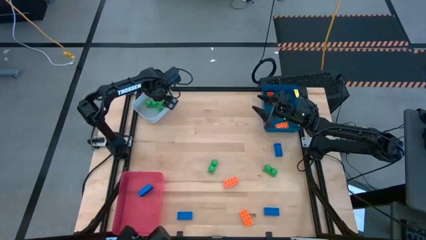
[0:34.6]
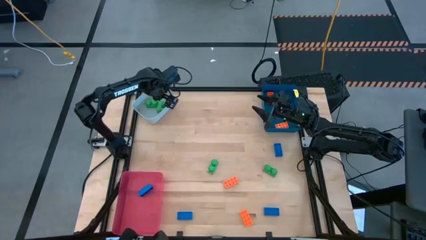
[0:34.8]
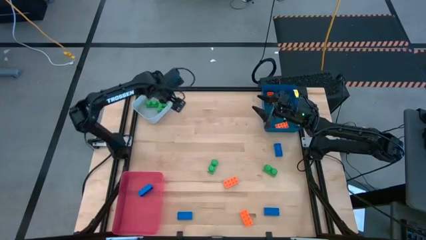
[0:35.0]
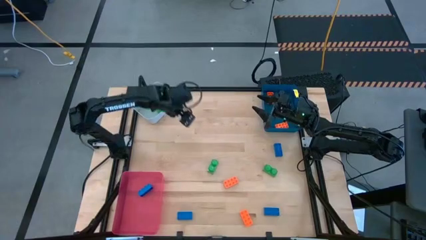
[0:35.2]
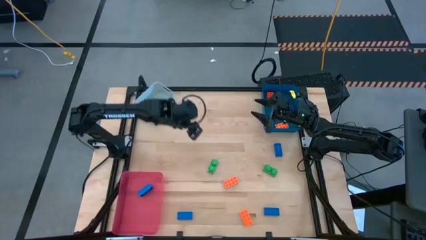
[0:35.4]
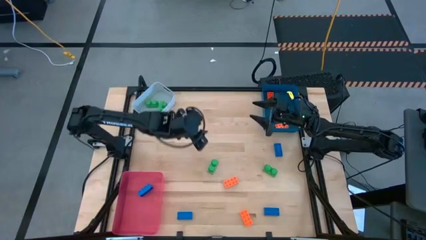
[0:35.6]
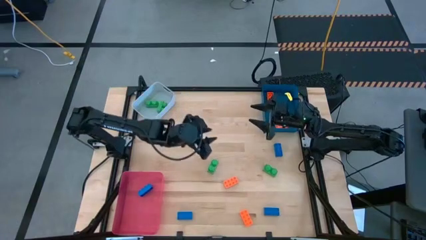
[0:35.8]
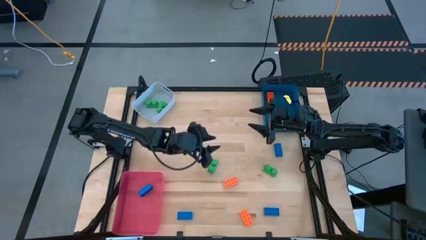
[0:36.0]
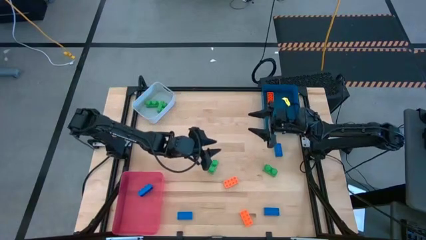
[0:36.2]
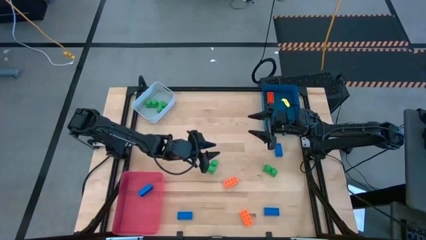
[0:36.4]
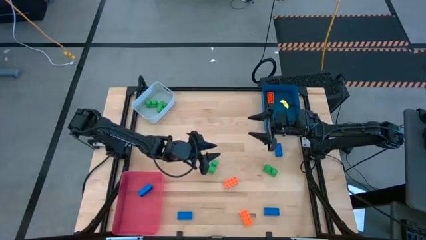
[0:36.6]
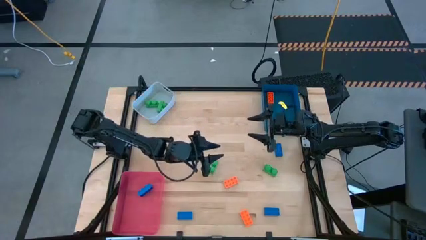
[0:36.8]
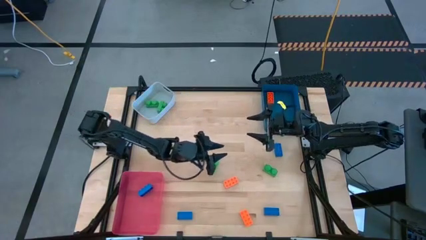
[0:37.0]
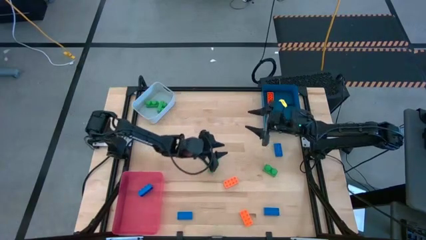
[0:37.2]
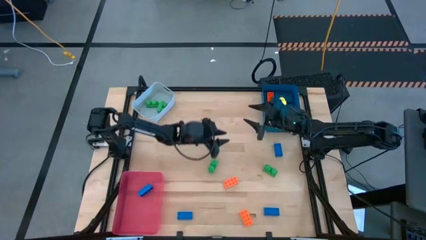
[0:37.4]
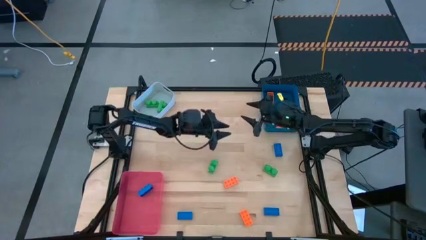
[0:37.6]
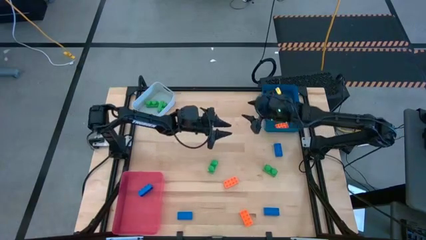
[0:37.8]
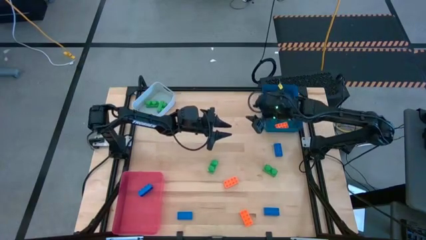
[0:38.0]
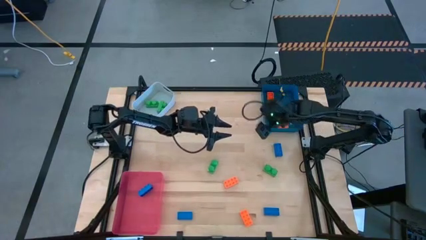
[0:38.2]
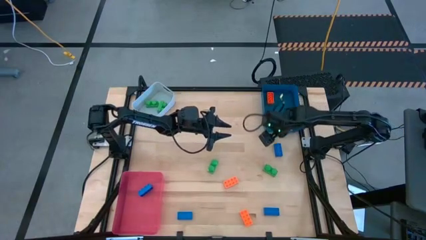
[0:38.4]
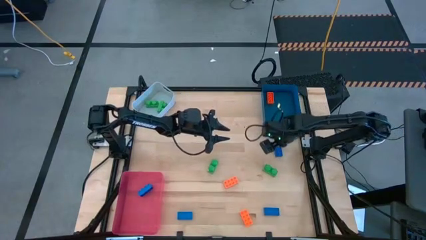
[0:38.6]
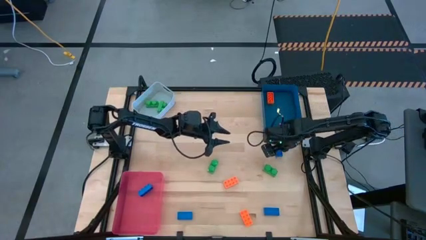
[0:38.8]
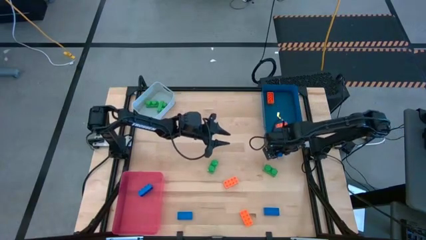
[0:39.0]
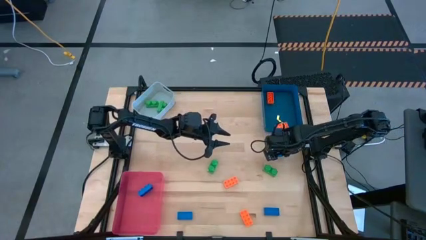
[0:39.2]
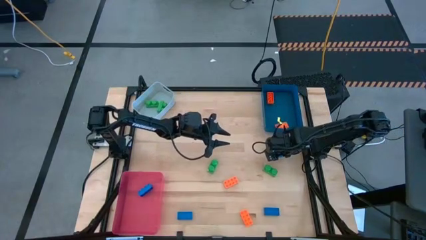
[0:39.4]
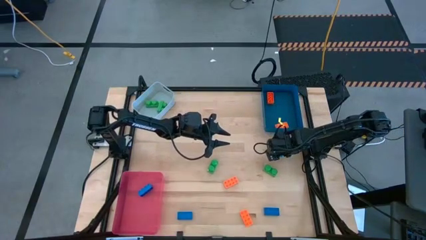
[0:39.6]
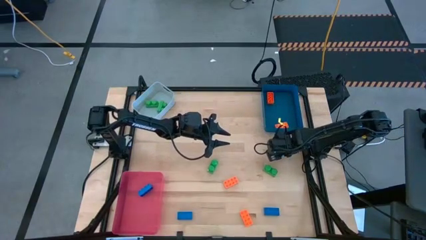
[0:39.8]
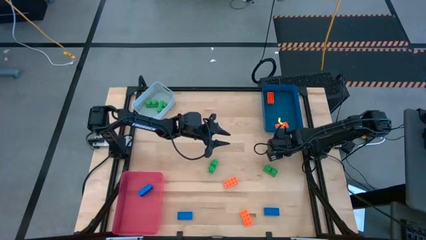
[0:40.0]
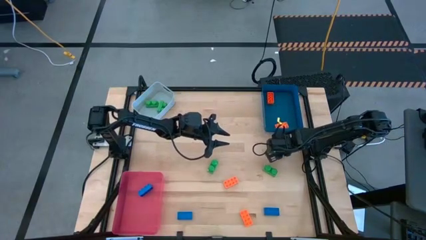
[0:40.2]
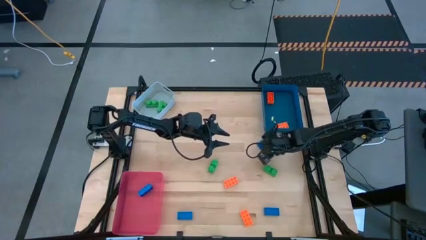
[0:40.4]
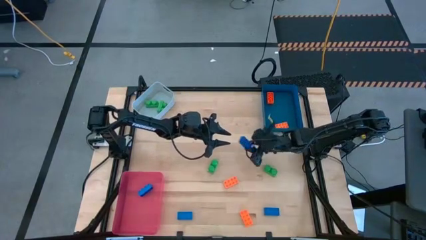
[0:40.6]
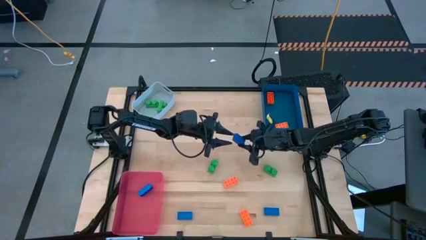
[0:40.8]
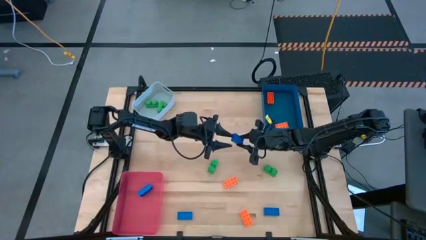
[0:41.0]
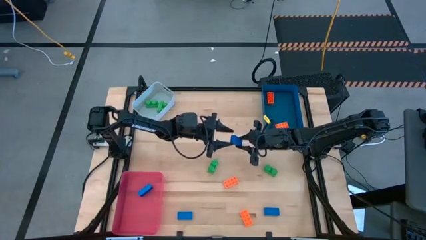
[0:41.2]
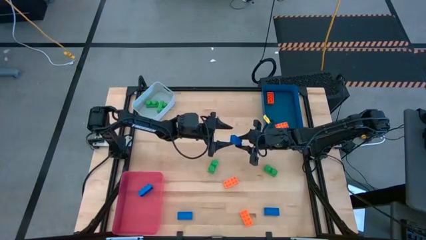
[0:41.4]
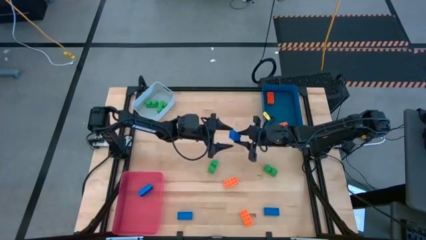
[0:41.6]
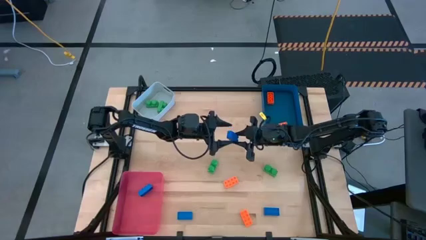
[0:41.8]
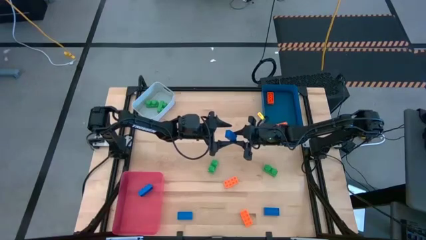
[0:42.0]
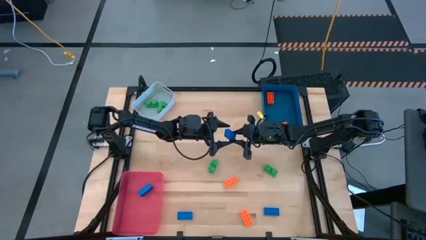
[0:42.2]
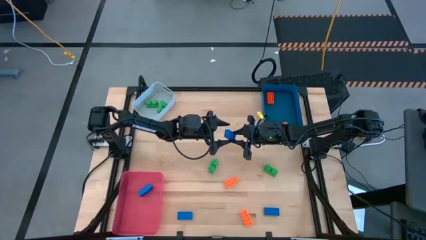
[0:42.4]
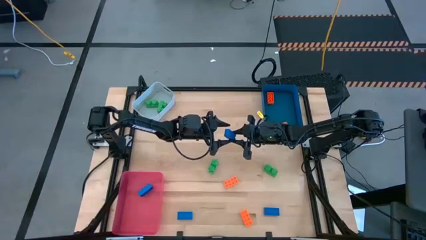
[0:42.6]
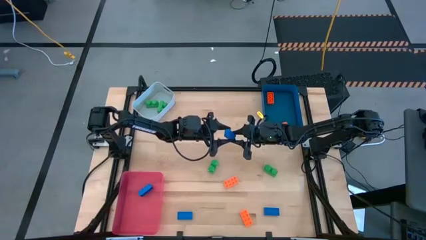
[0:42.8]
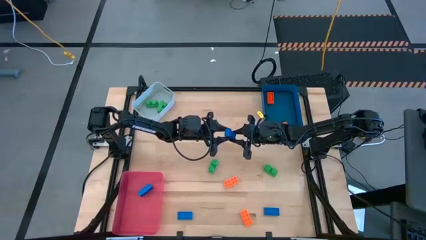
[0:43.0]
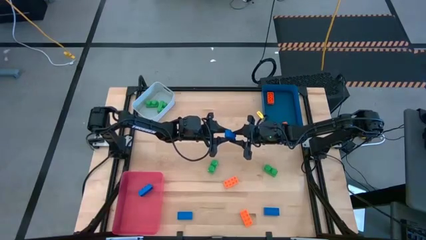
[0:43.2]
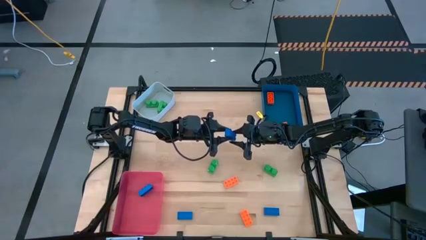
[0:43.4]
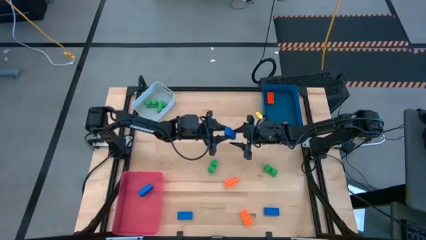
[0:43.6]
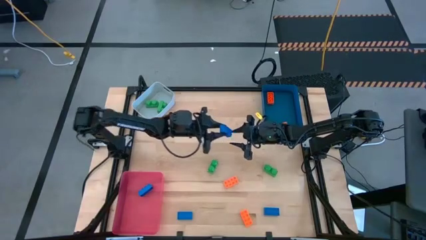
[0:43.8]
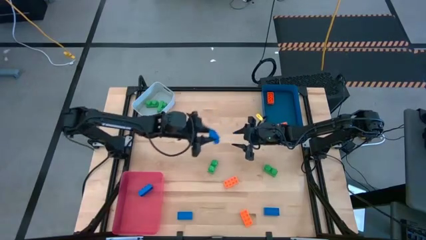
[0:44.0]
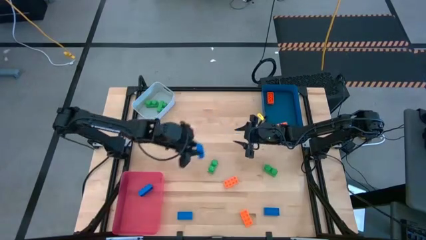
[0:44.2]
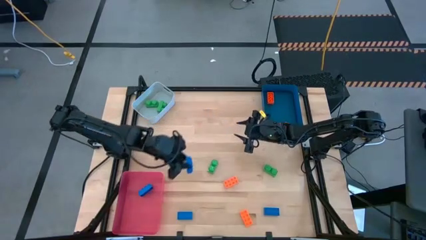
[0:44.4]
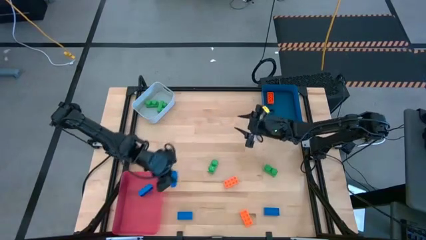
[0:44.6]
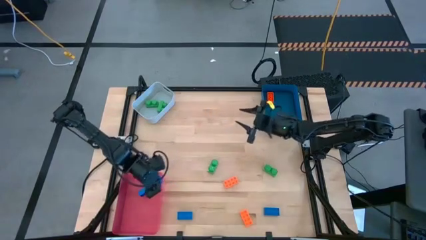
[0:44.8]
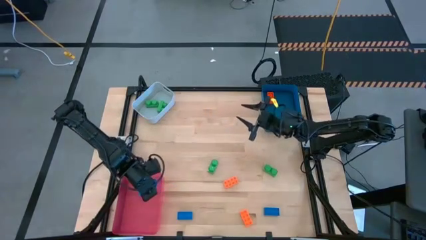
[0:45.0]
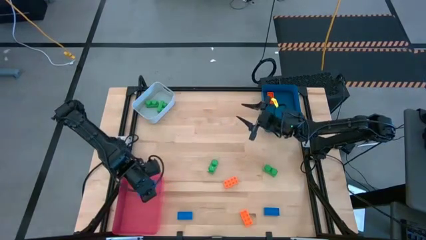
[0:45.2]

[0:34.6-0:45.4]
Task: Sort & place blocks by color
Put the blue game piece into the red bin

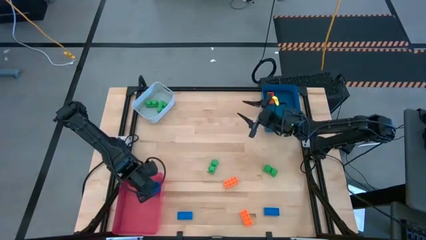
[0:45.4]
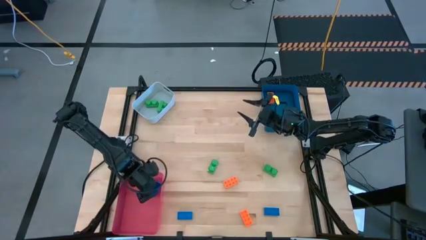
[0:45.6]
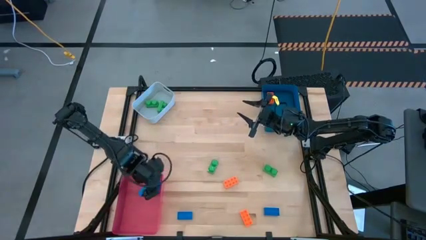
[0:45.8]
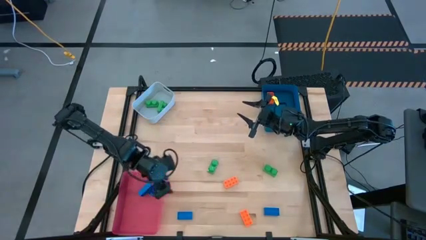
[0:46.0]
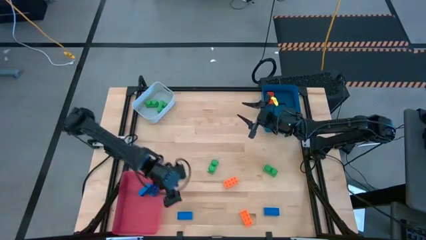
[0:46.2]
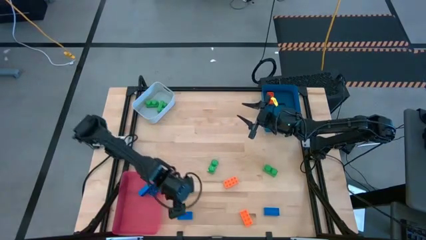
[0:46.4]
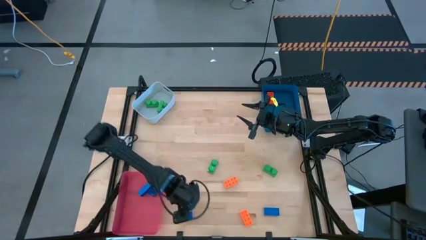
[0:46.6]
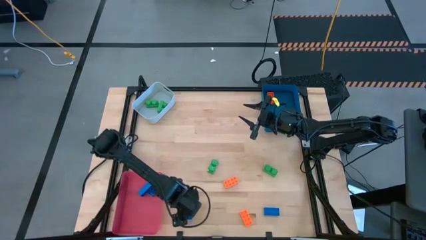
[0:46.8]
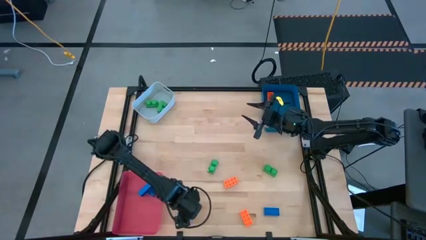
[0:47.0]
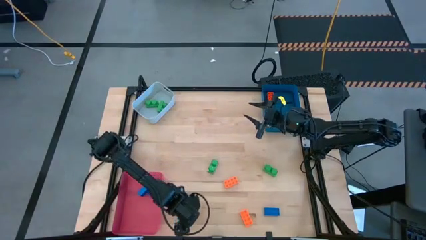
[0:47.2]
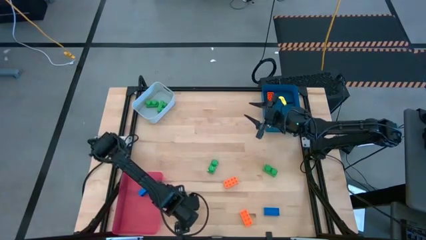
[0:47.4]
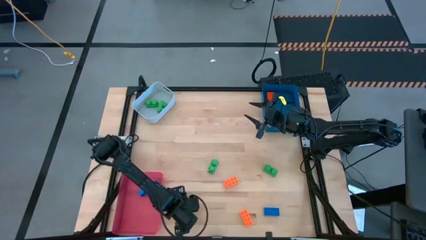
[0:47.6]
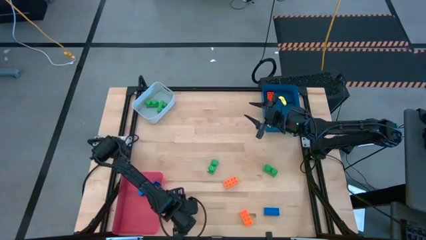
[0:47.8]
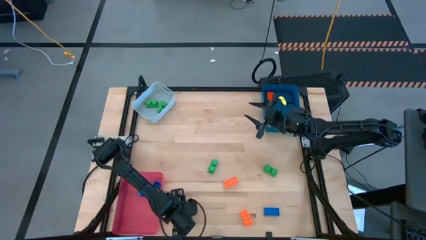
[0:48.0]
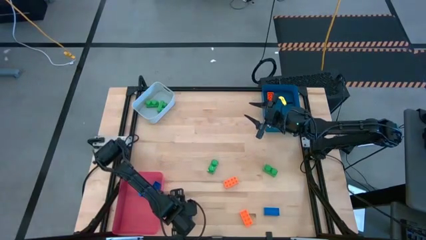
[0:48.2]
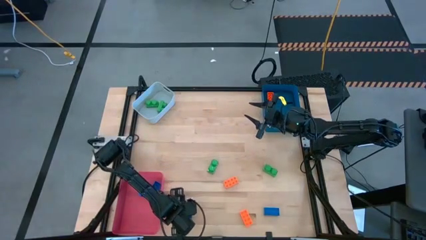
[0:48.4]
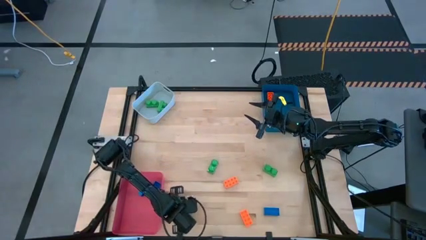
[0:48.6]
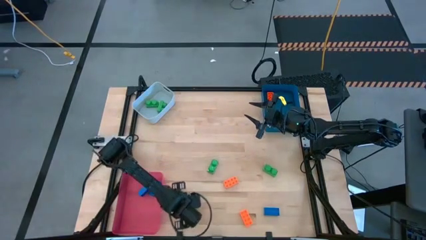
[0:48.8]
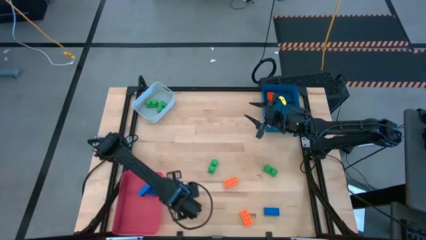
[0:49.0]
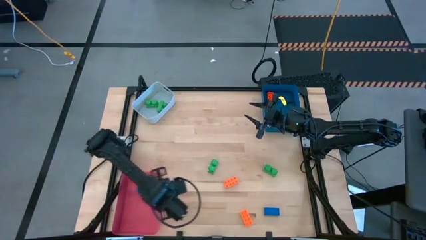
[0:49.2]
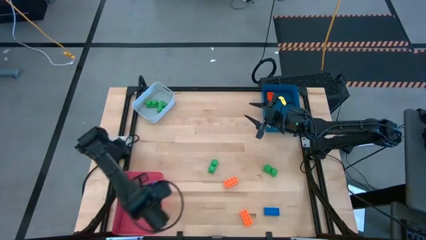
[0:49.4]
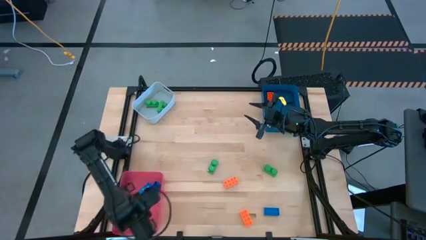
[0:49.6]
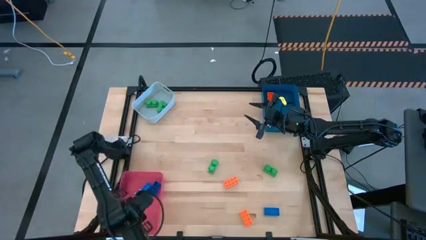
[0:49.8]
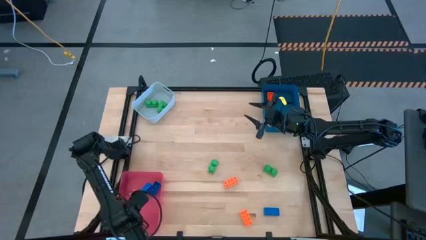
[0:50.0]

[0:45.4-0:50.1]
Put the blue game piece into the red bin
